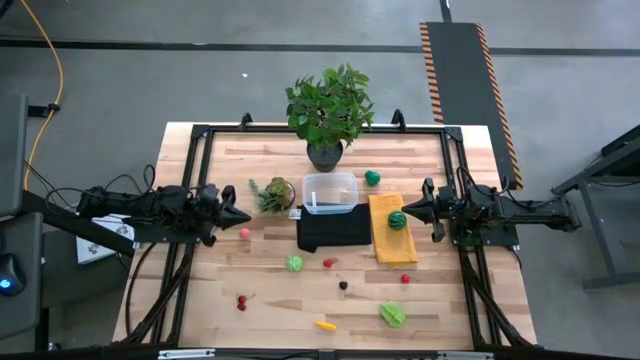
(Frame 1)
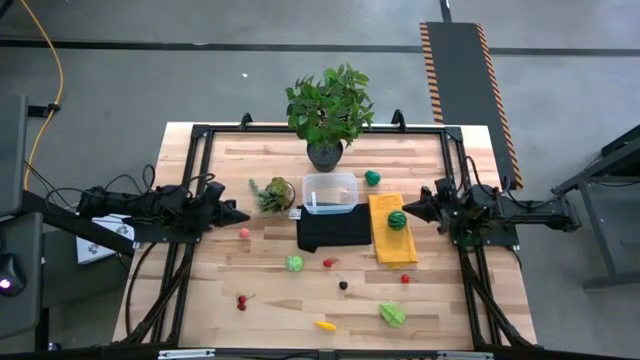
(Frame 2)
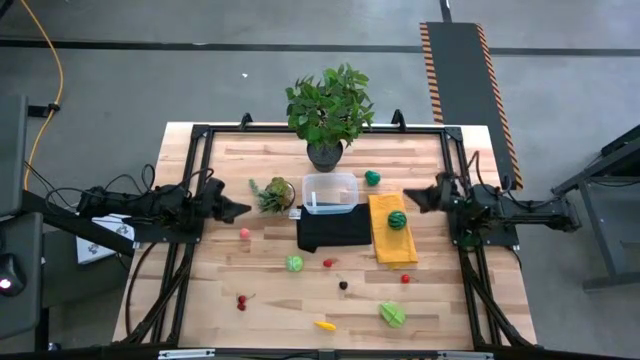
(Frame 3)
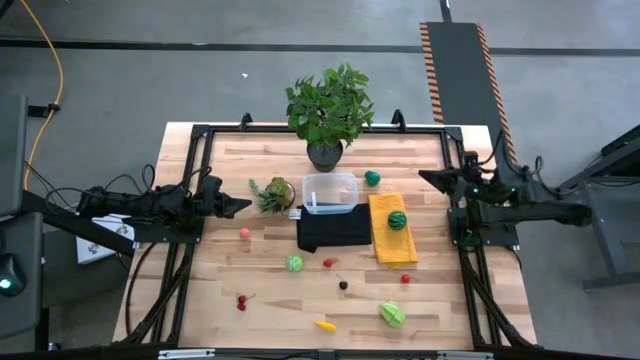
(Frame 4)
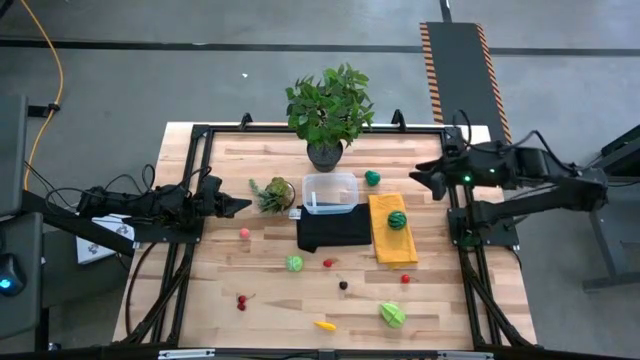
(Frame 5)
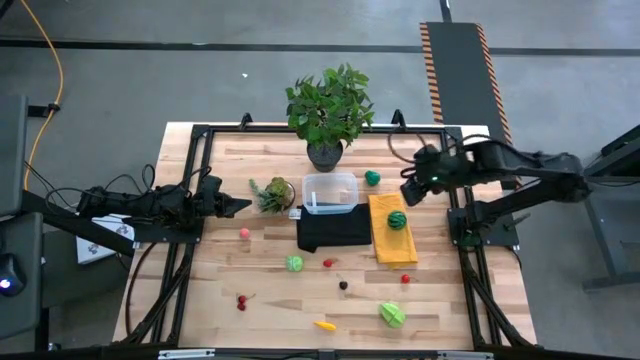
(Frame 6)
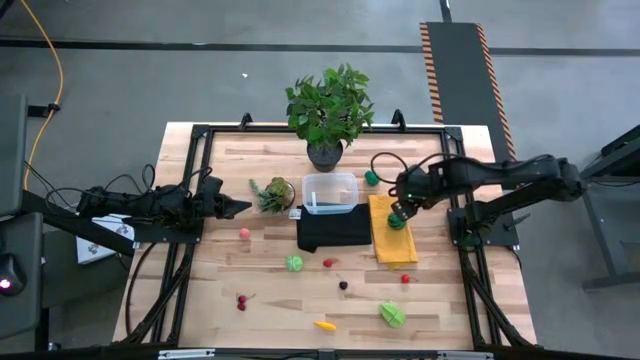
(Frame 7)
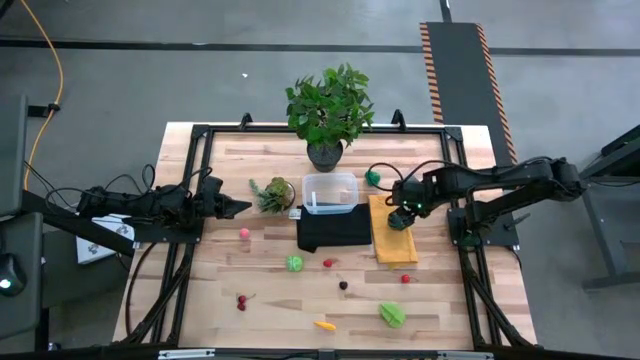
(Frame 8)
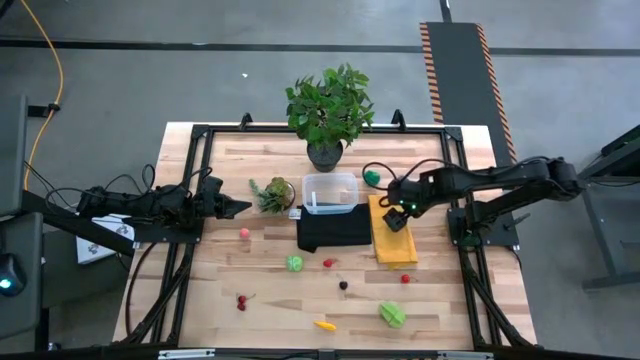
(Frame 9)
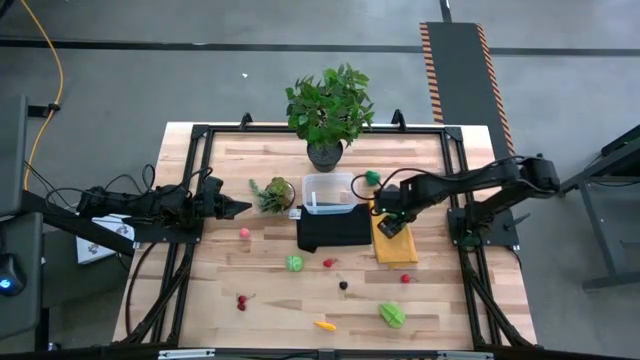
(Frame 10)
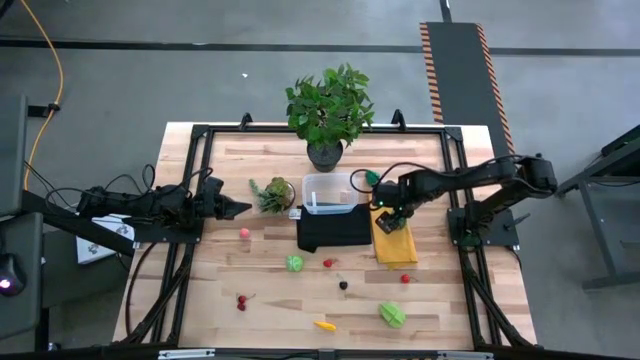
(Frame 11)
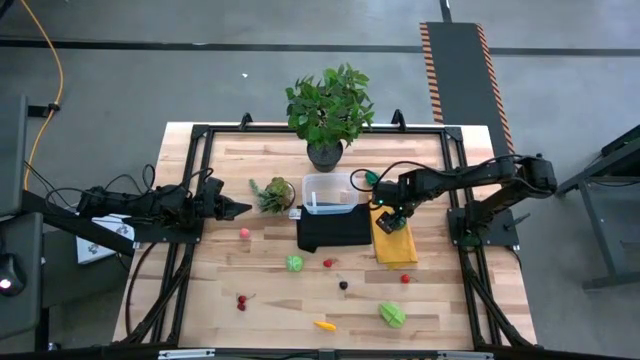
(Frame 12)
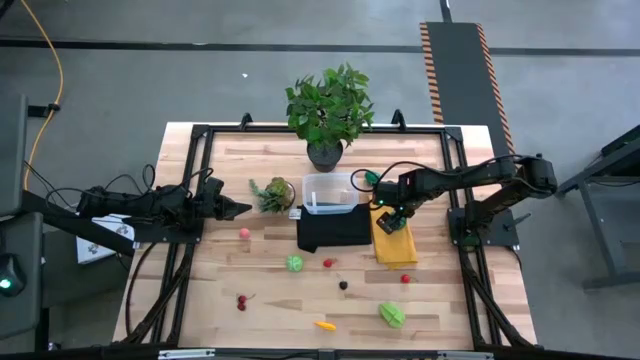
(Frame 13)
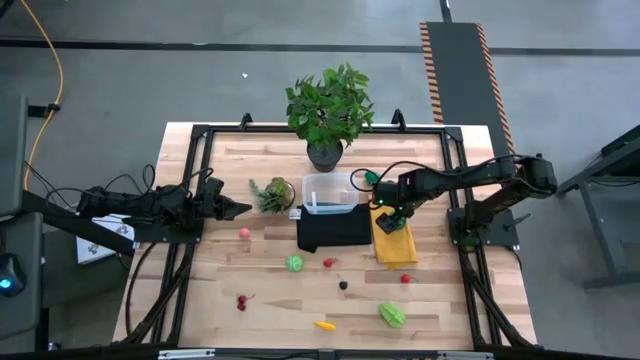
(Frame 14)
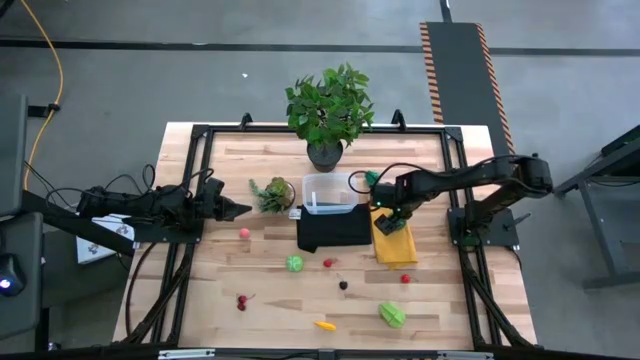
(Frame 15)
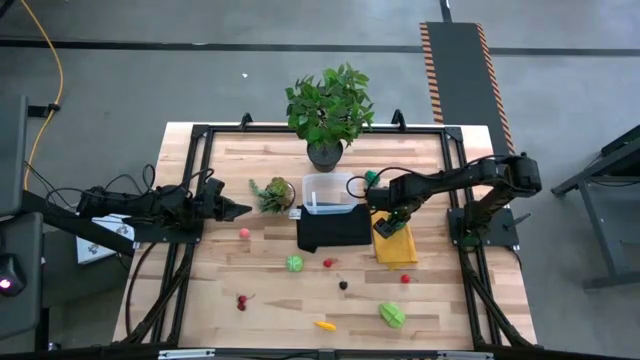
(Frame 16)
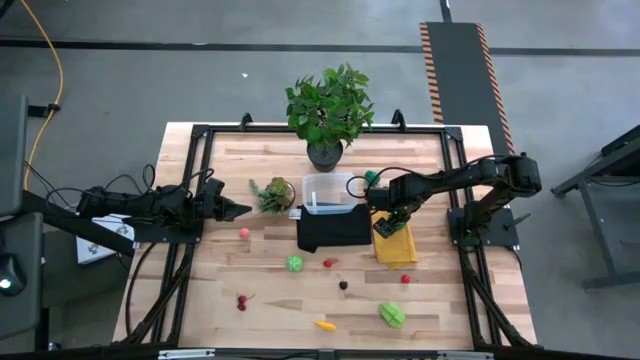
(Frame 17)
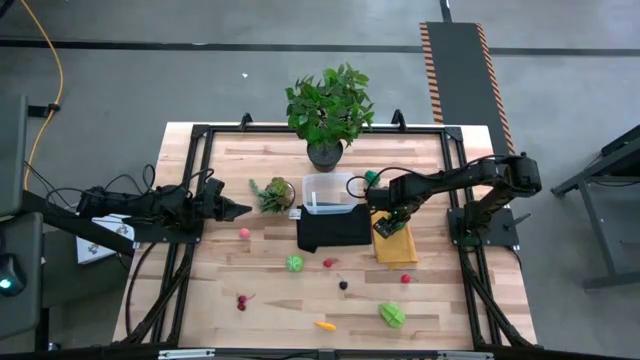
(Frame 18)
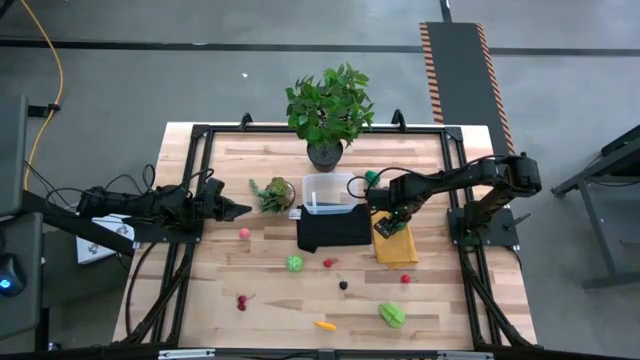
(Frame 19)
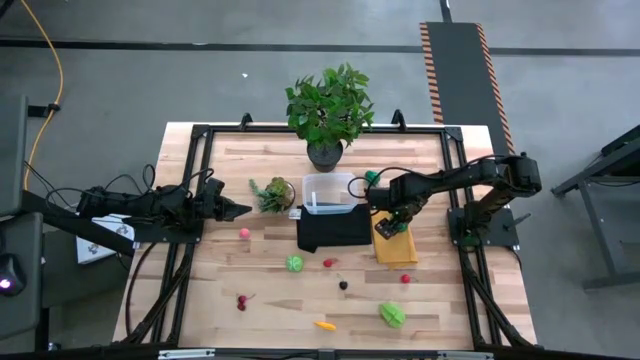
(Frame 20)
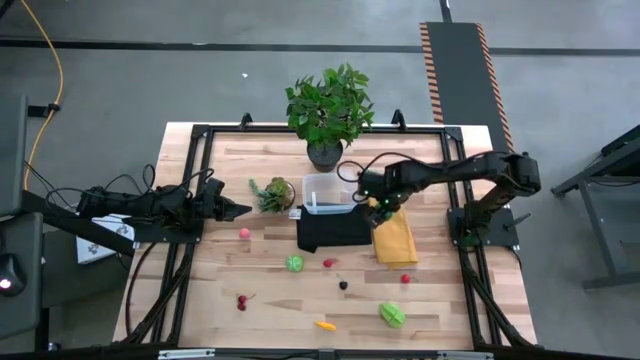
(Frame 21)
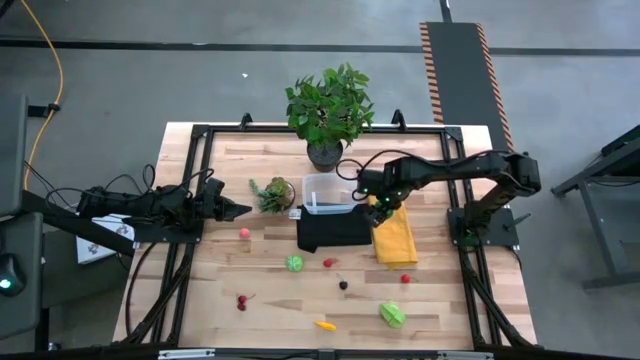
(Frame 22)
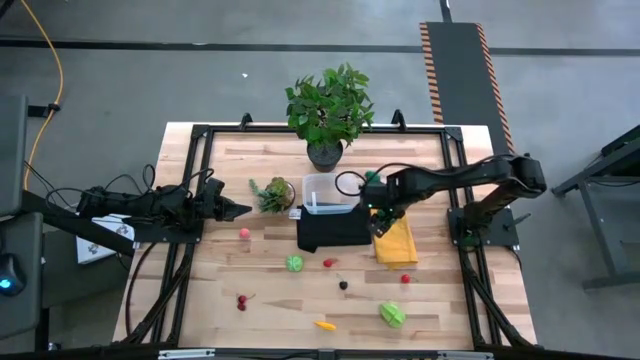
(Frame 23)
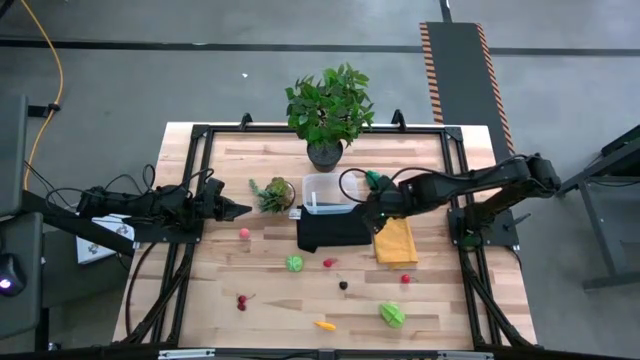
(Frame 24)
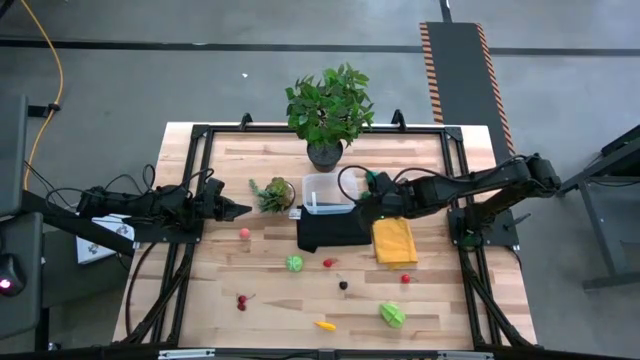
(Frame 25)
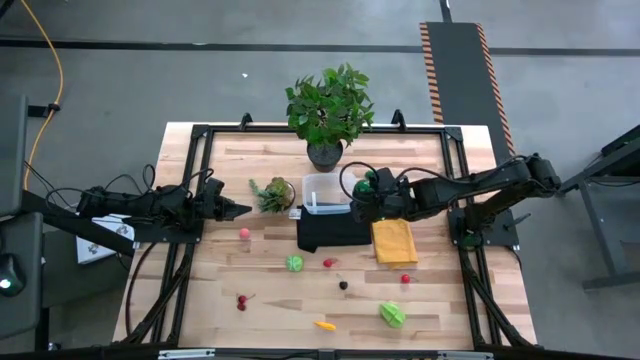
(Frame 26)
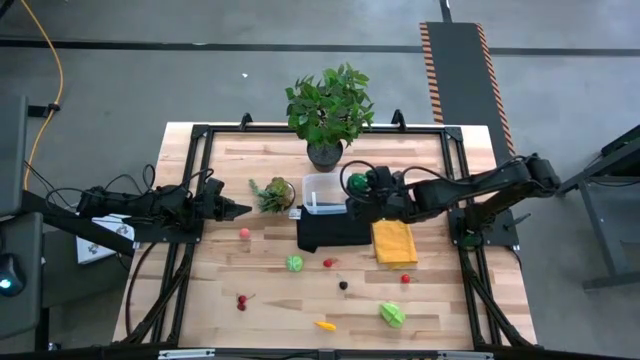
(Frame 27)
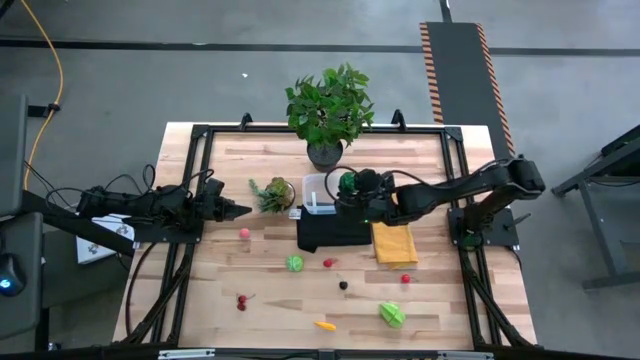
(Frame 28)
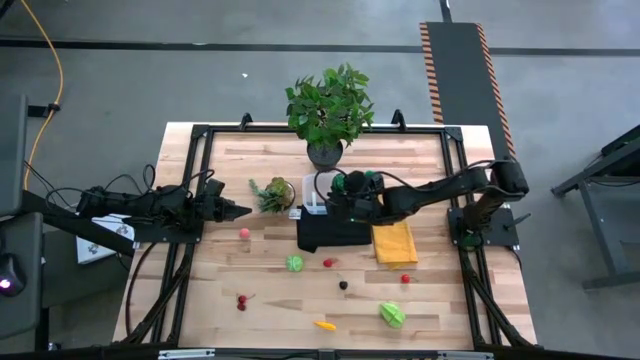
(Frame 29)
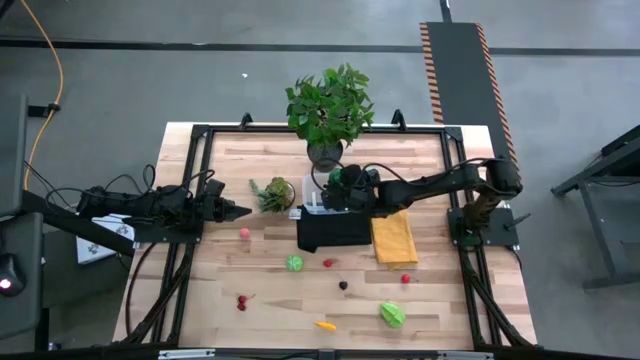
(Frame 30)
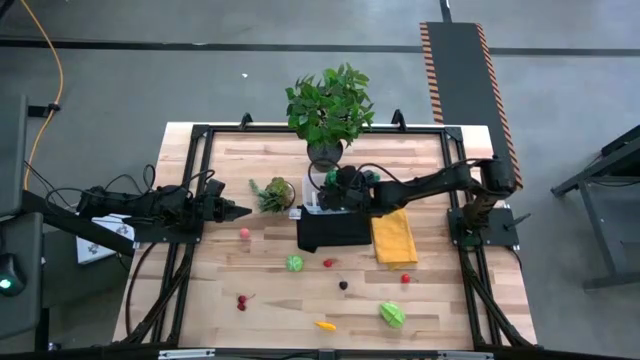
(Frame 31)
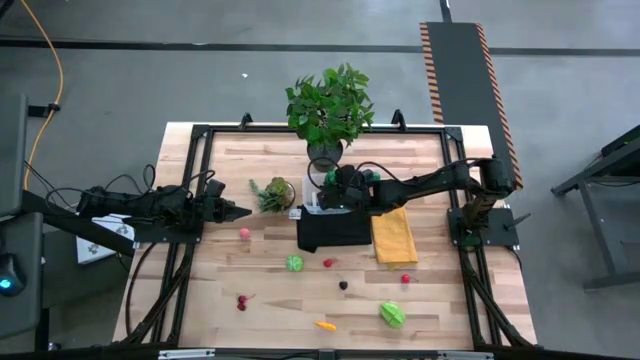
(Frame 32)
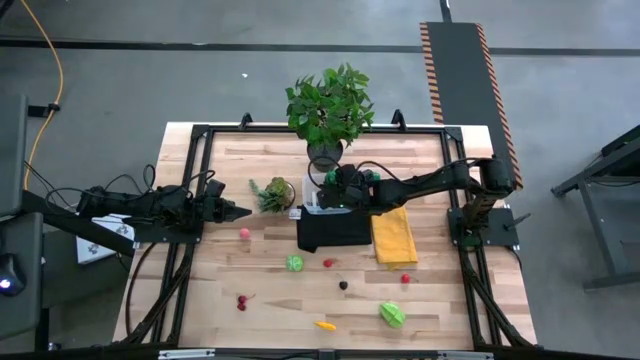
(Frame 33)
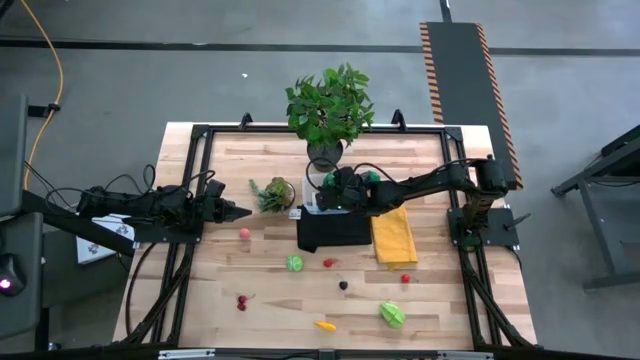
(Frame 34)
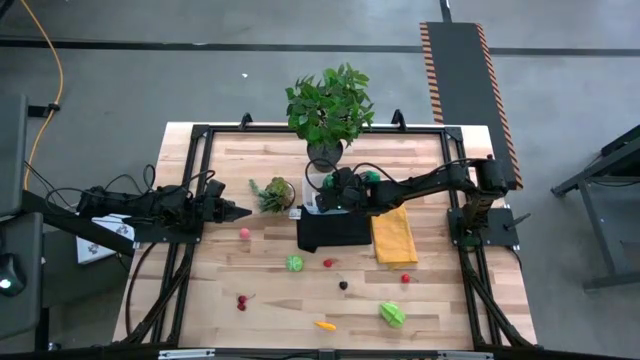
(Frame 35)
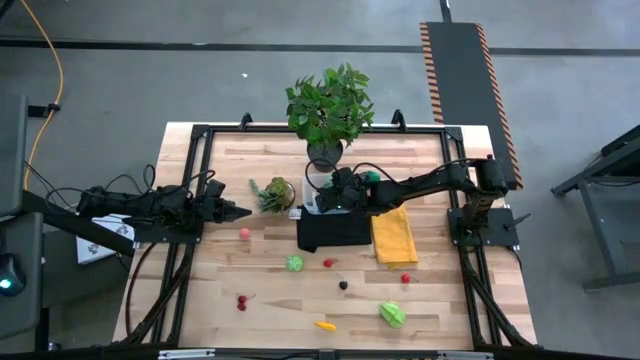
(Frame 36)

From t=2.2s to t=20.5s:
Task: Pick and placing Produce into tupperware
Put the watermelon into the transparent bin
